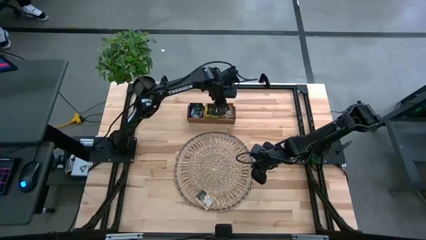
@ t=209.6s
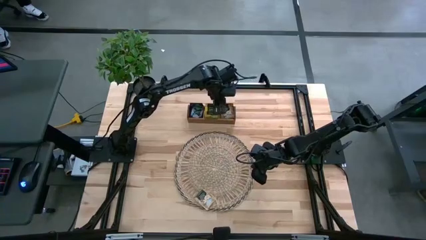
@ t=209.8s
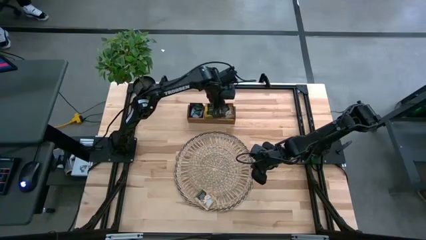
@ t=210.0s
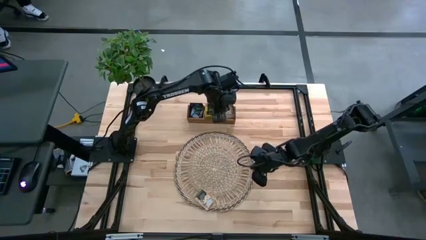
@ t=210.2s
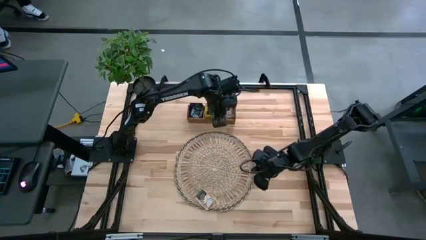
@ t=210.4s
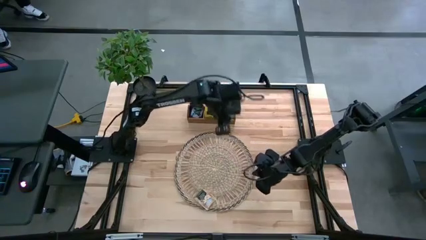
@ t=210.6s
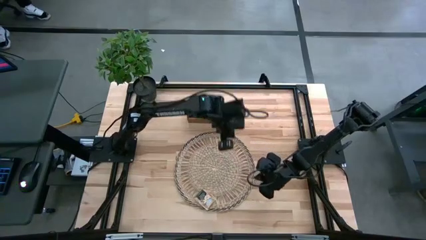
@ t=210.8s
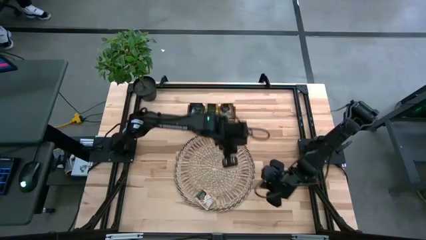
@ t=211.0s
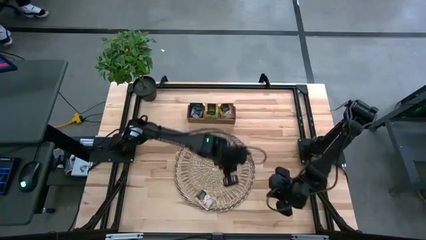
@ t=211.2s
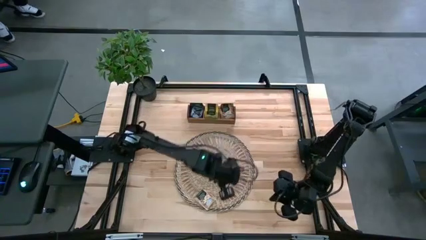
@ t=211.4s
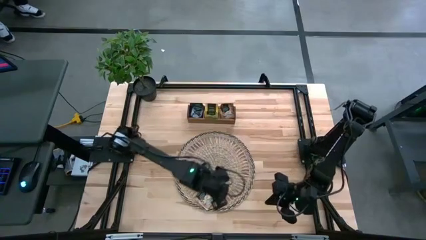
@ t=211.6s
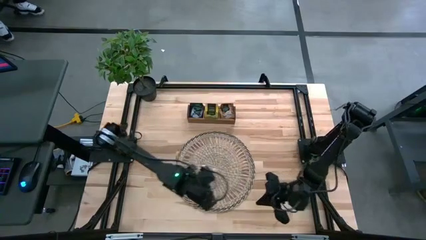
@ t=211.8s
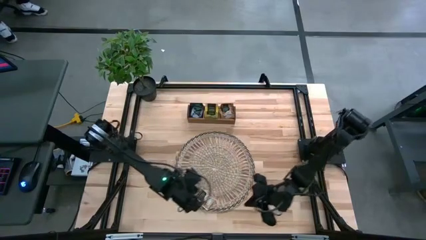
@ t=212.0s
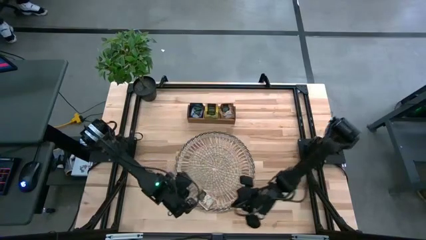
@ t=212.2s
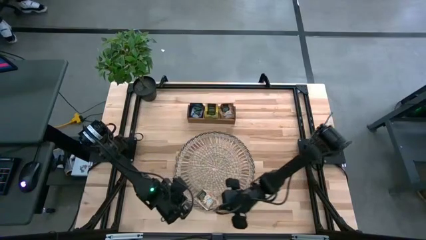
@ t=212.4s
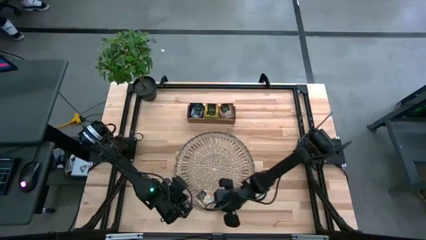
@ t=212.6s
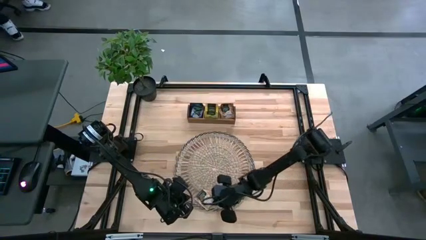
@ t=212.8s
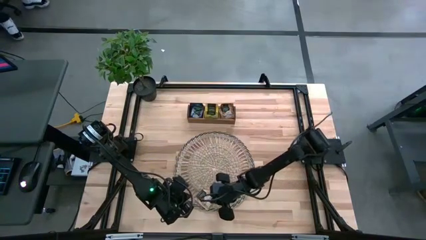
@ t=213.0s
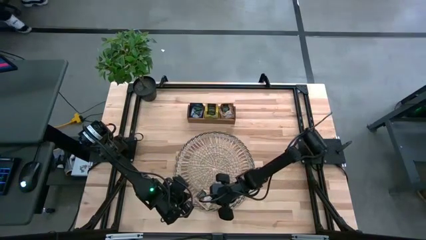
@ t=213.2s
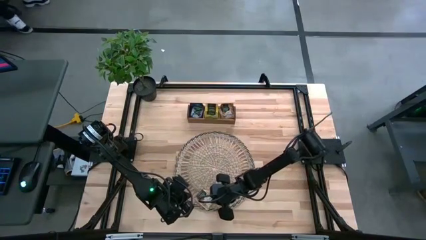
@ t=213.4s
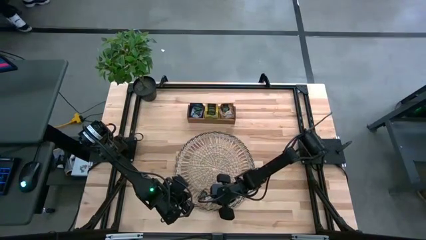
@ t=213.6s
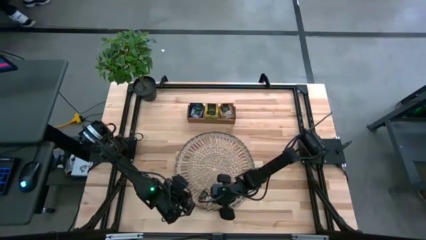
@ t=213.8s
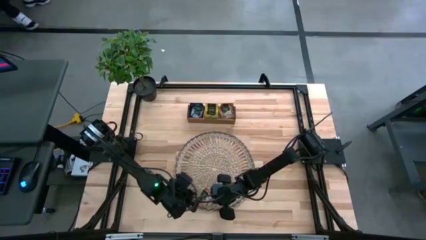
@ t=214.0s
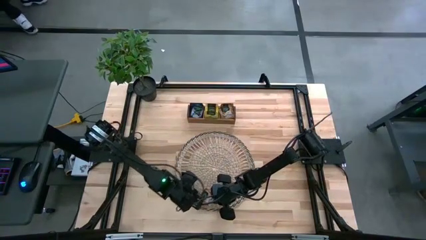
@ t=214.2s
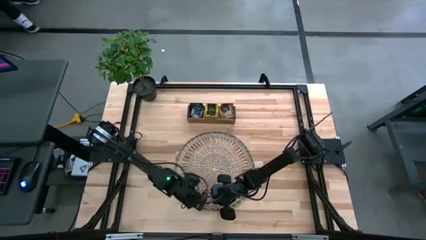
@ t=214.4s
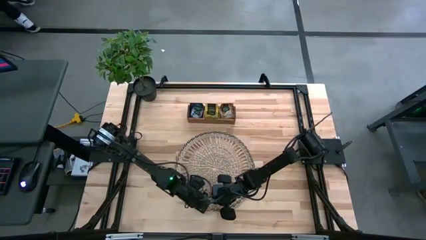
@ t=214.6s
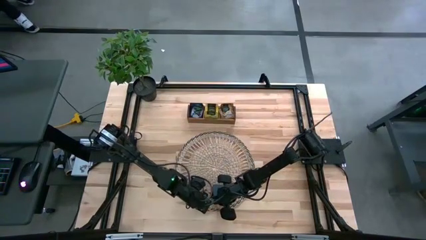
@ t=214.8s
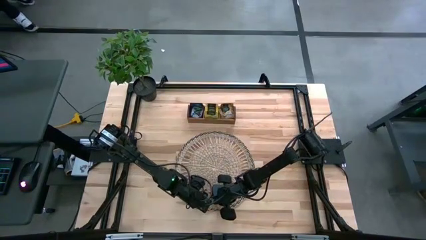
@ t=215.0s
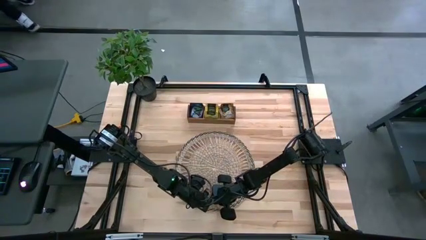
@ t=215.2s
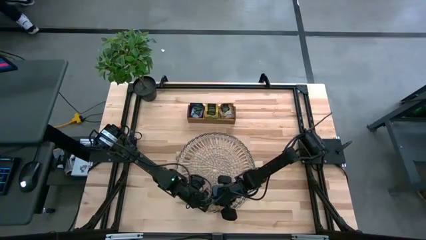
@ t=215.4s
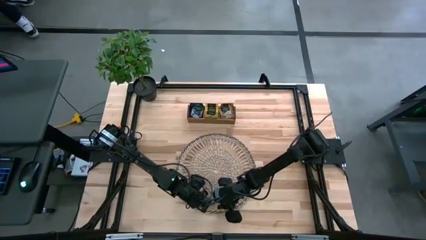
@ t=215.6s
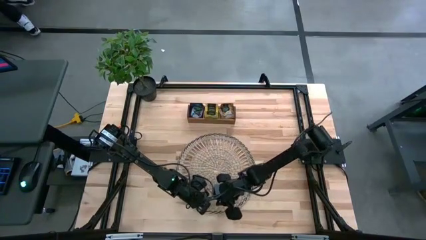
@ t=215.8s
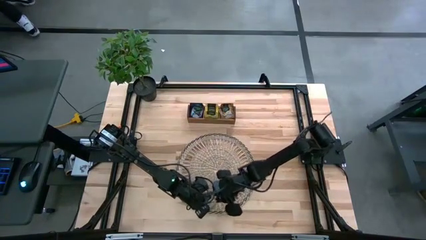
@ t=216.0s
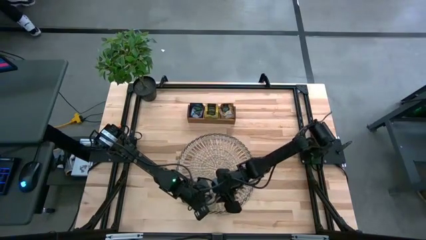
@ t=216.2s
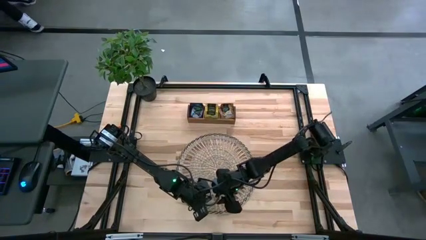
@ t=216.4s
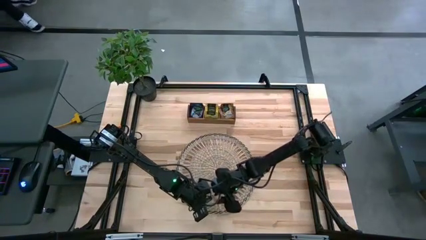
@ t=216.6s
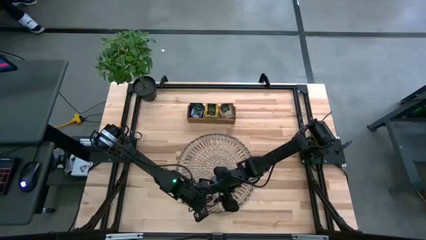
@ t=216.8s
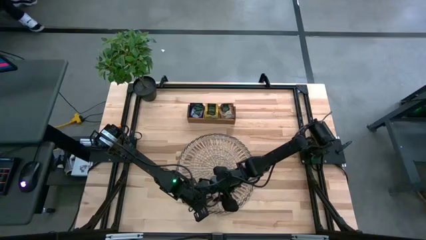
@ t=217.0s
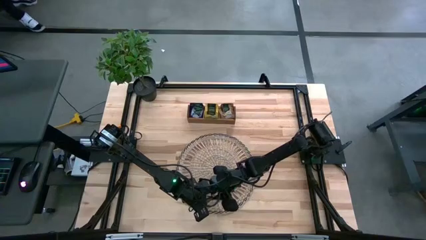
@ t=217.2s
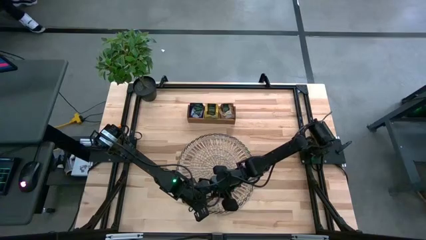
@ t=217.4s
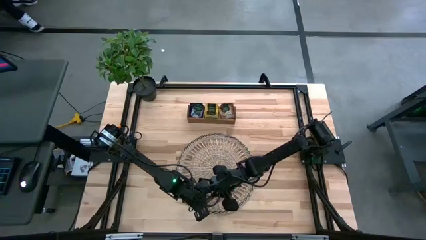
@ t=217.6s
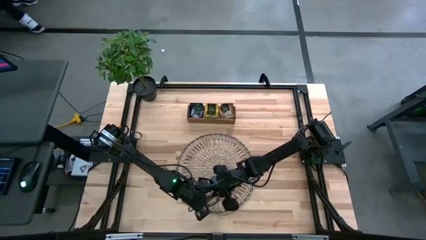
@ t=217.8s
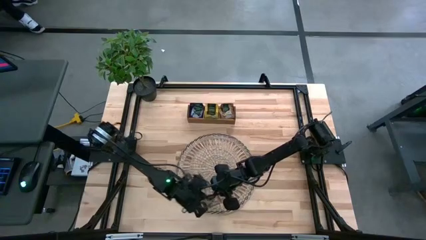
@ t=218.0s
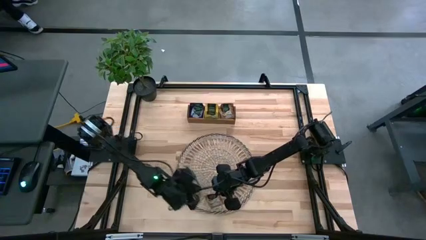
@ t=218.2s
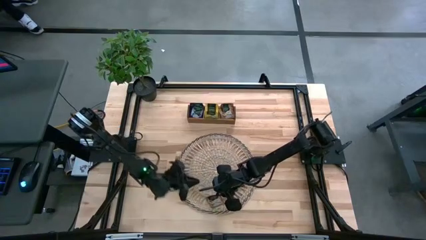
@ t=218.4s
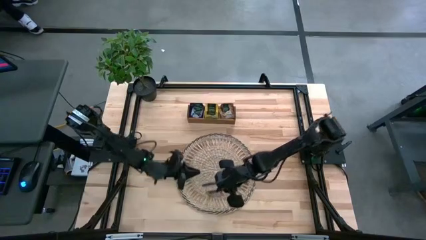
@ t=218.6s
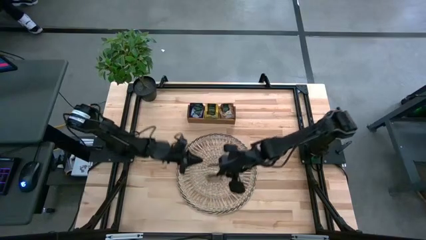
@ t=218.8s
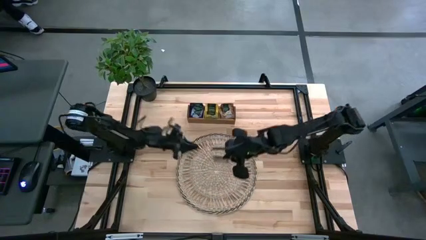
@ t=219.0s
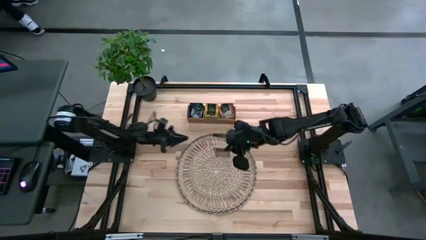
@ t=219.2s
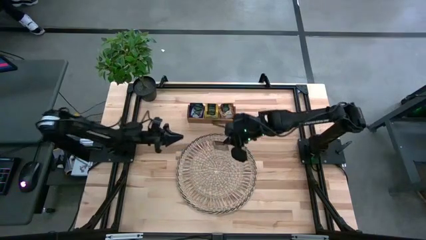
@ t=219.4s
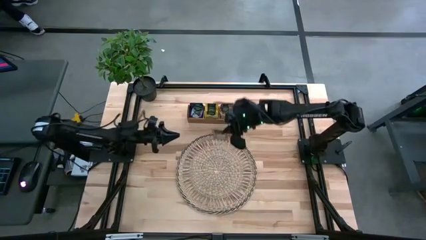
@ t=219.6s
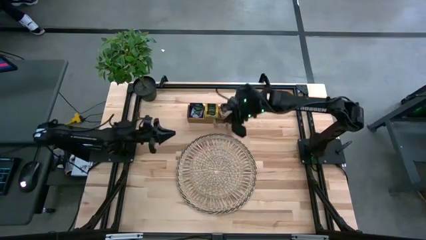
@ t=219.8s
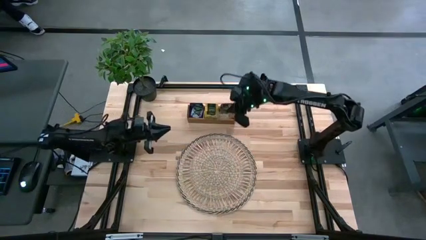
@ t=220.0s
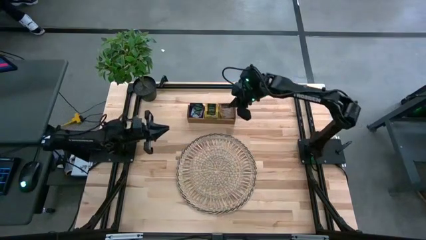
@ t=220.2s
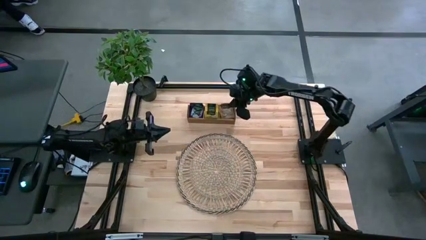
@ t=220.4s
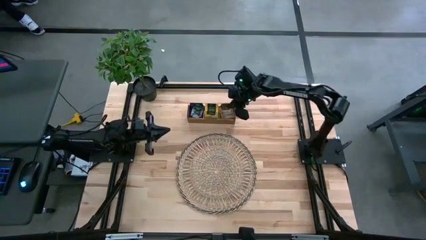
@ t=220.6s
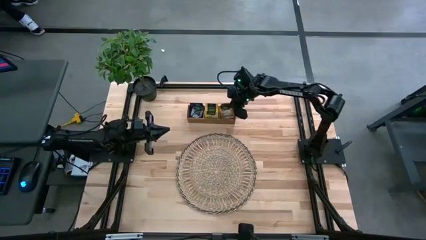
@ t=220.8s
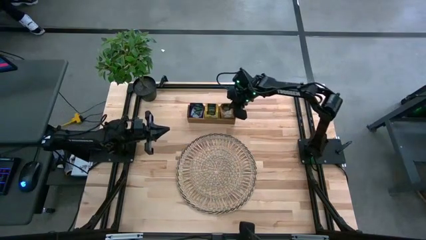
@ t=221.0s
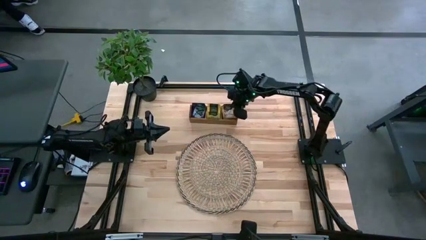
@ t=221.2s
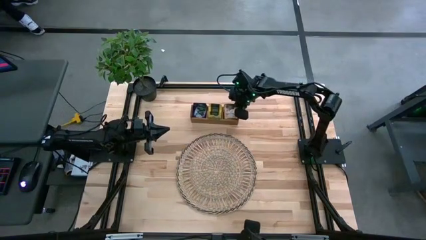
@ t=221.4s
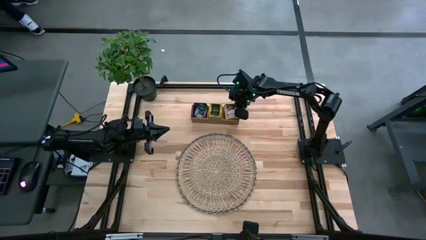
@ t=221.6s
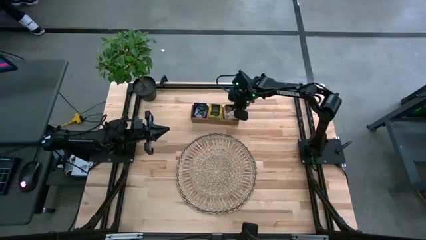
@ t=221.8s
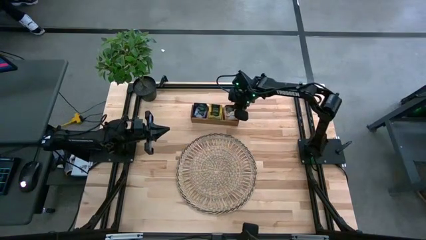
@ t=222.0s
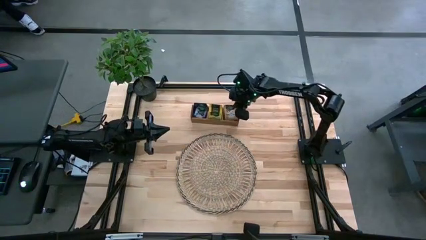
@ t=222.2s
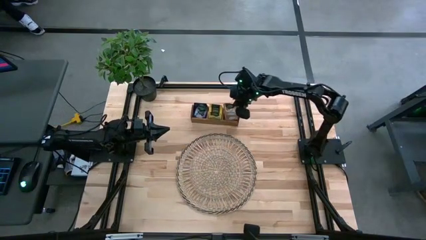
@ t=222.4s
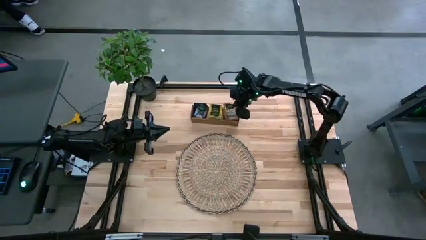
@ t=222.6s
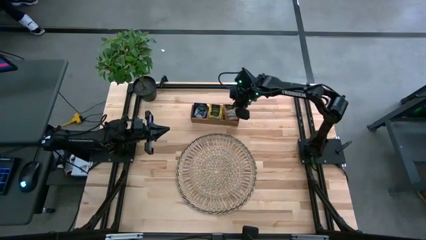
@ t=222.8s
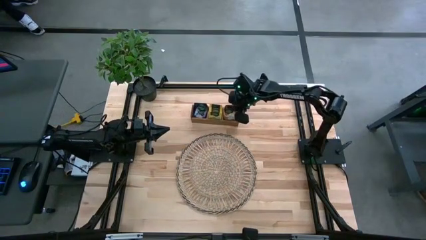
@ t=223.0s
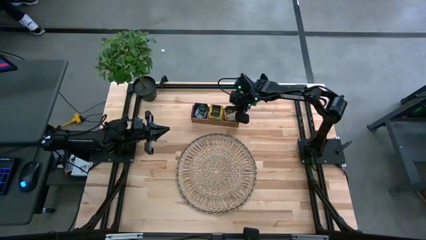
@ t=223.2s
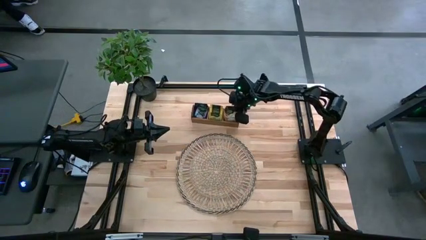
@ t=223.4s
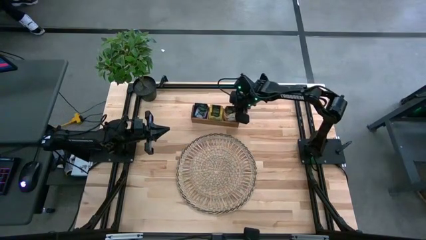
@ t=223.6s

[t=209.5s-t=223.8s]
Task: Pick & Place Tea
Put the brown tea bag in the right section of the wooden organizer

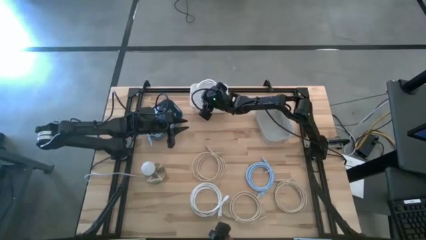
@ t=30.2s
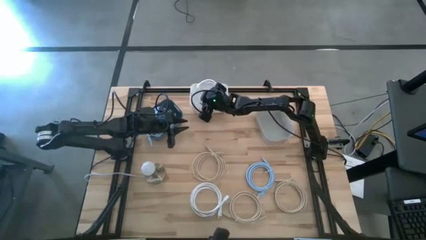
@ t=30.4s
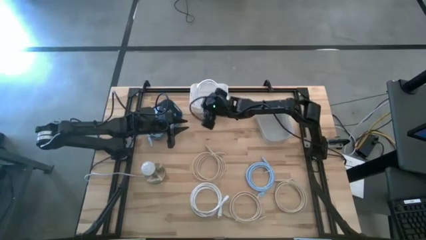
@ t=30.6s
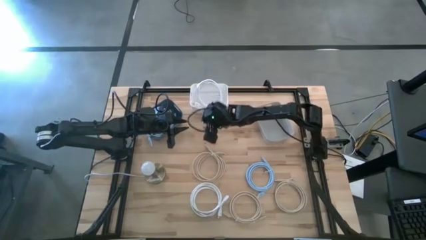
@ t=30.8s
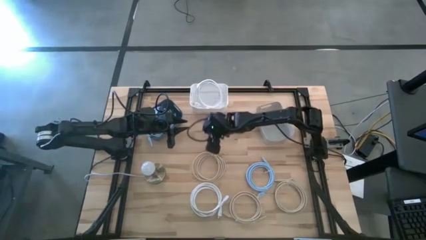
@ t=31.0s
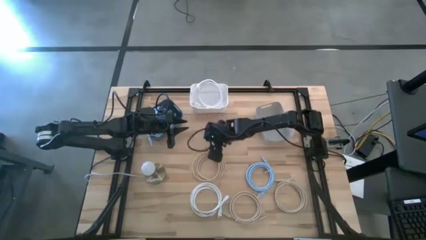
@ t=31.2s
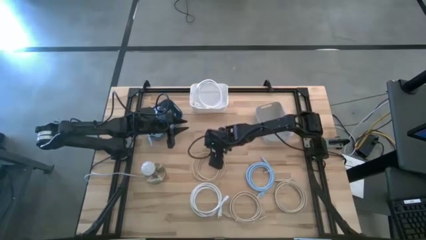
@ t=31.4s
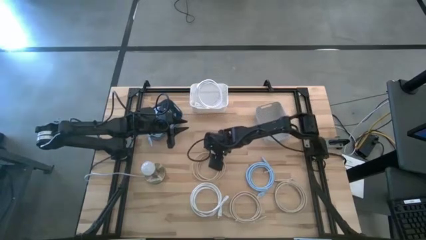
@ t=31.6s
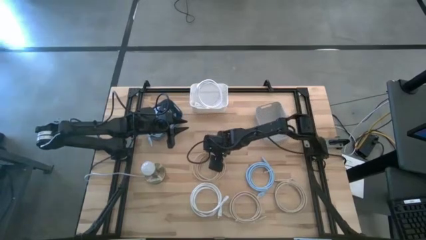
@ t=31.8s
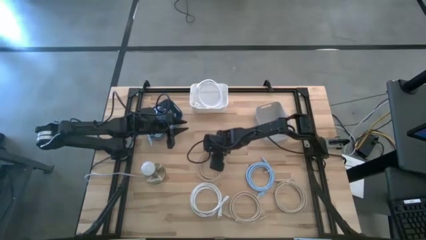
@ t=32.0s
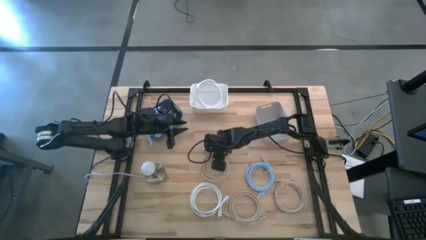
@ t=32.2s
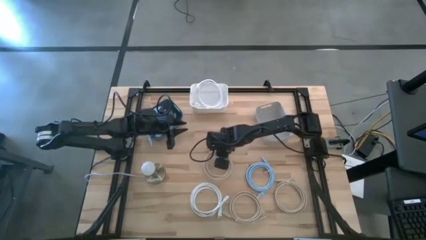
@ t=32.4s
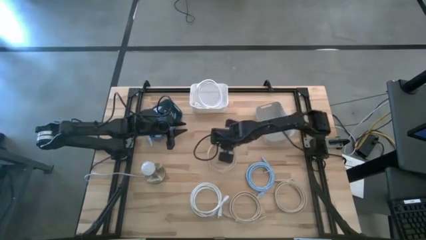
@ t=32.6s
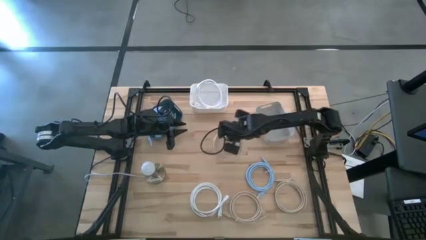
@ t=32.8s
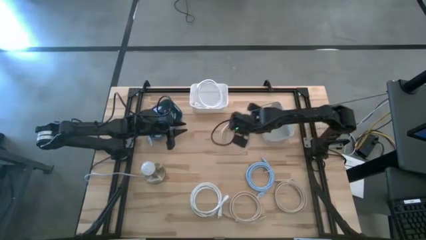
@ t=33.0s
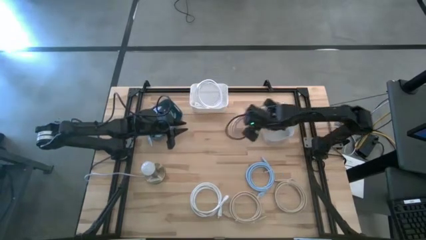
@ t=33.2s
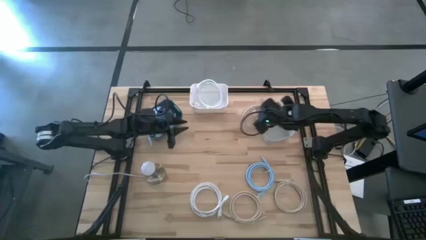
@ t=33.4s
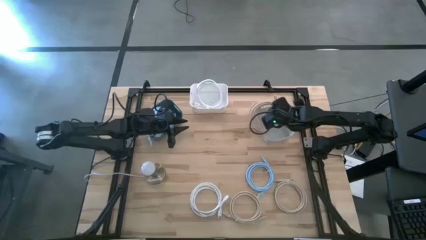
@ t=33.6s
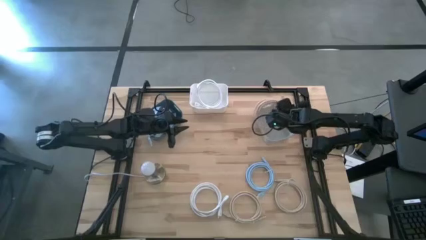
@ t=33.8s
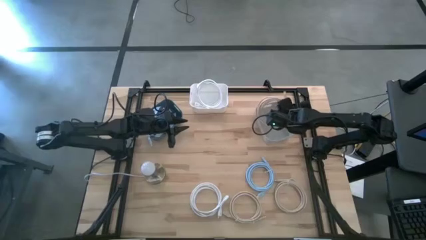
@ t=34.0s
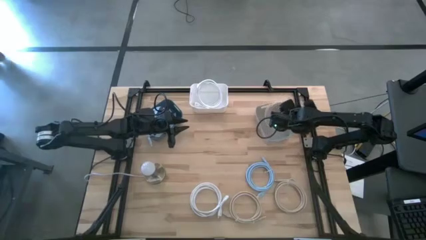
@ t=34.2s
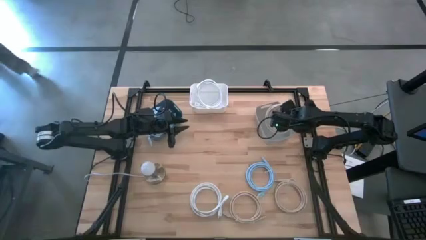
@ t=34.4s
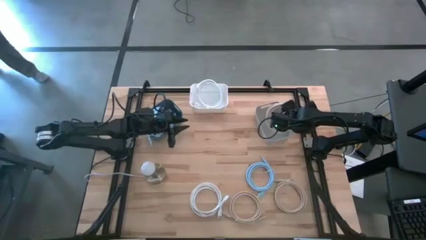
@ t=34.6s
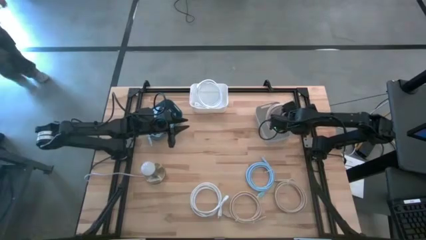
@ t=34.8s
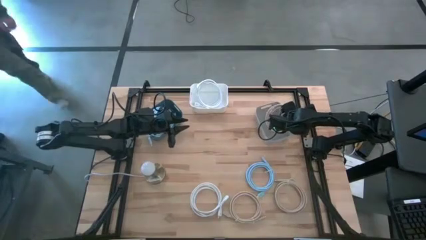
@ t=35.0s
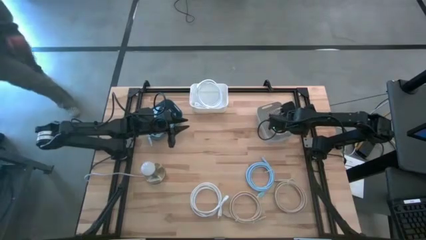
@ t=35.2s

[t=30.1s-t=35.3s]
Task: Sort HDMI cables
Put the top left brown hdmi cable into the gray bin
